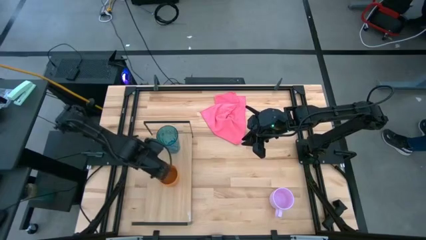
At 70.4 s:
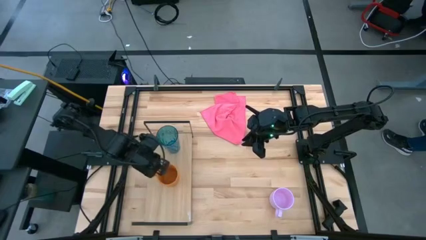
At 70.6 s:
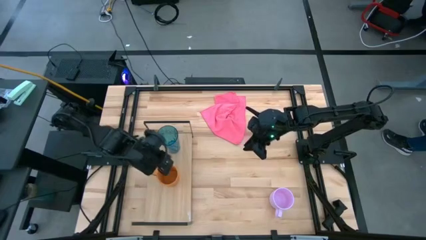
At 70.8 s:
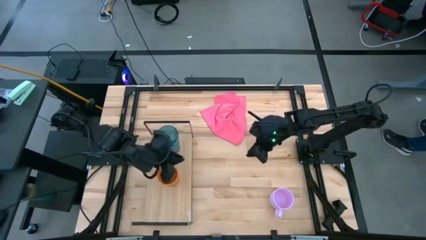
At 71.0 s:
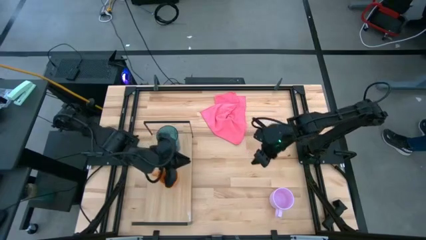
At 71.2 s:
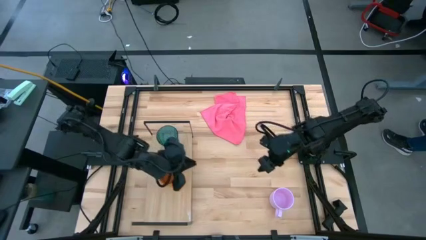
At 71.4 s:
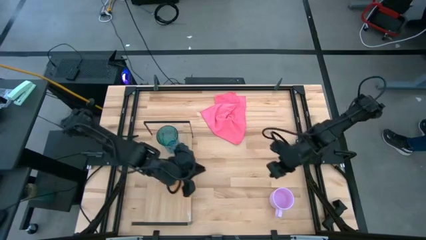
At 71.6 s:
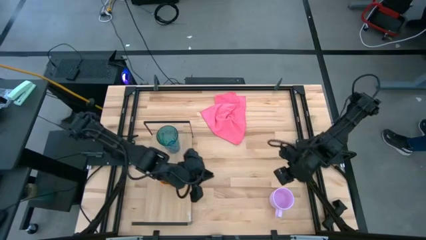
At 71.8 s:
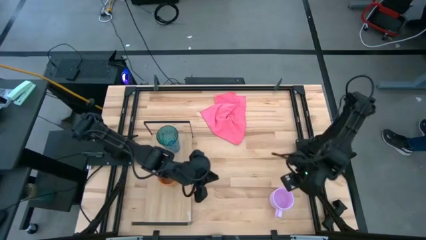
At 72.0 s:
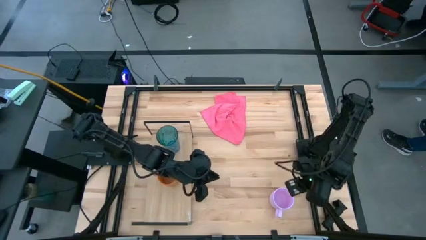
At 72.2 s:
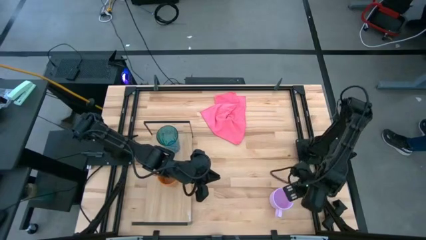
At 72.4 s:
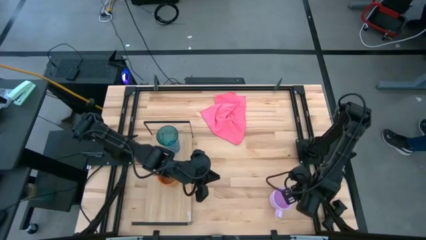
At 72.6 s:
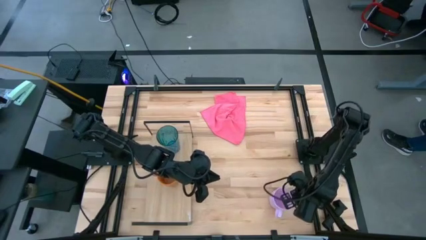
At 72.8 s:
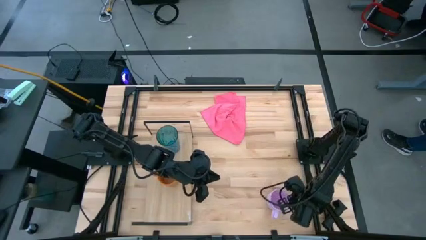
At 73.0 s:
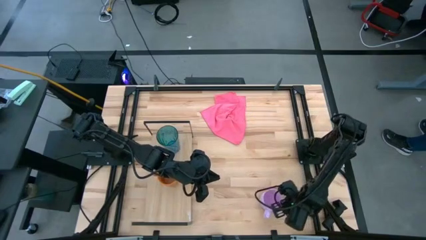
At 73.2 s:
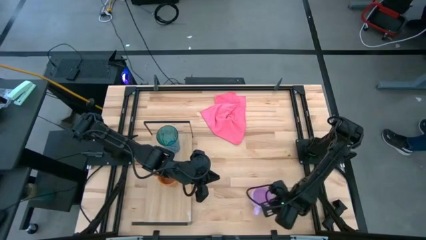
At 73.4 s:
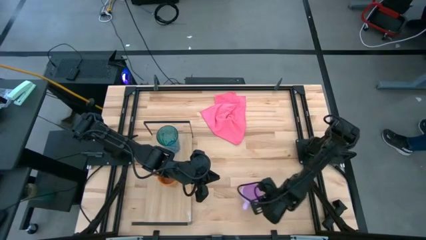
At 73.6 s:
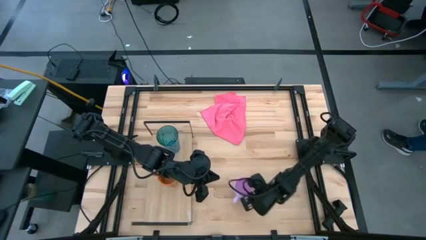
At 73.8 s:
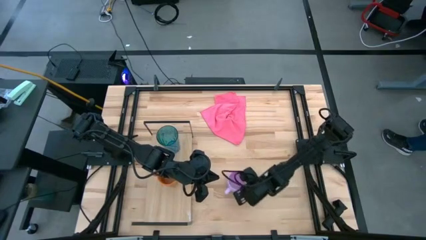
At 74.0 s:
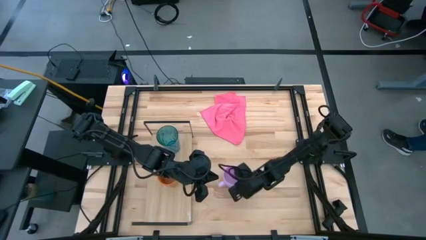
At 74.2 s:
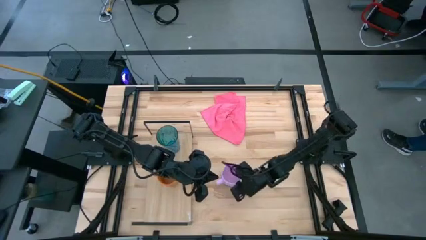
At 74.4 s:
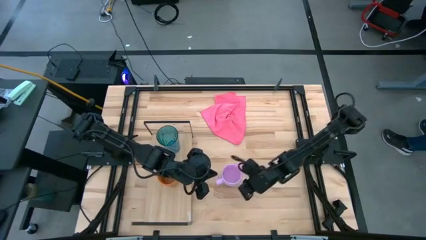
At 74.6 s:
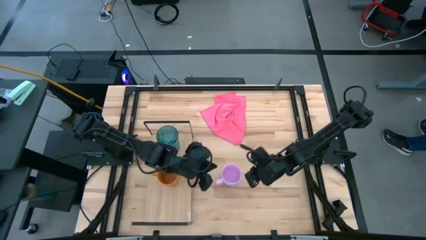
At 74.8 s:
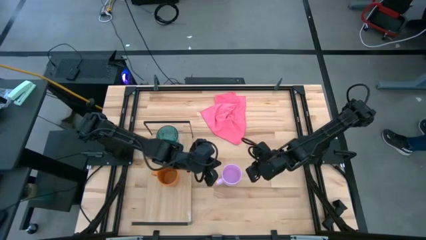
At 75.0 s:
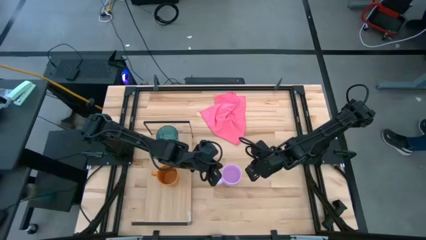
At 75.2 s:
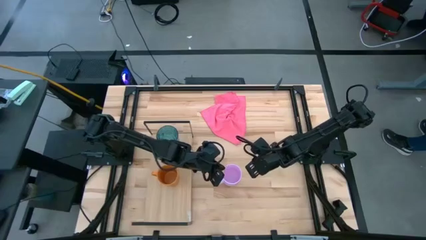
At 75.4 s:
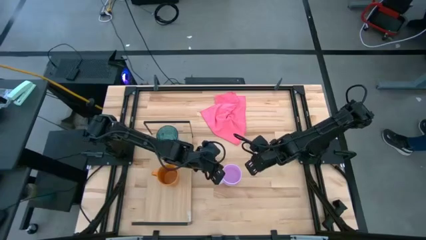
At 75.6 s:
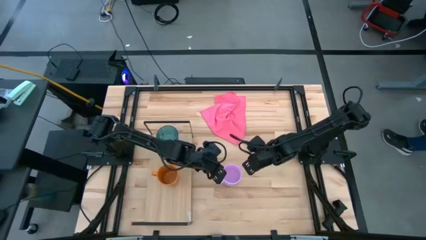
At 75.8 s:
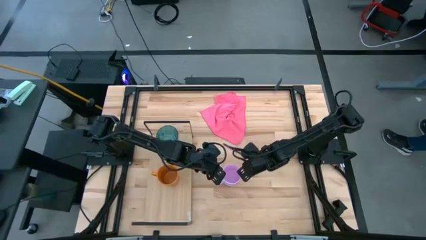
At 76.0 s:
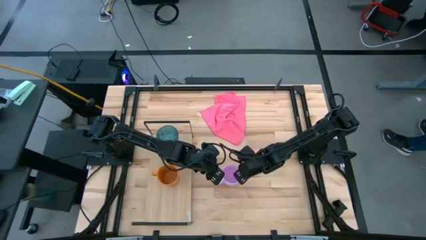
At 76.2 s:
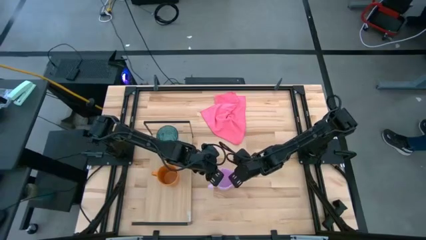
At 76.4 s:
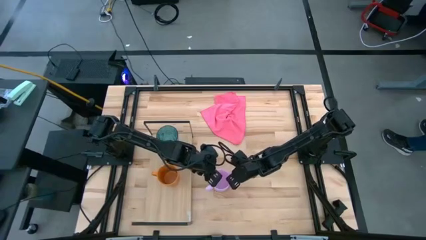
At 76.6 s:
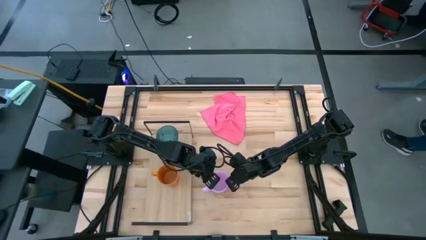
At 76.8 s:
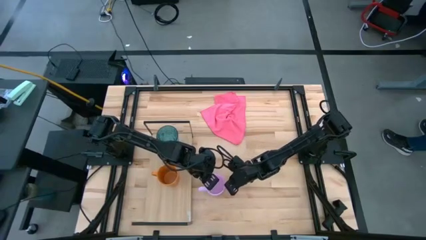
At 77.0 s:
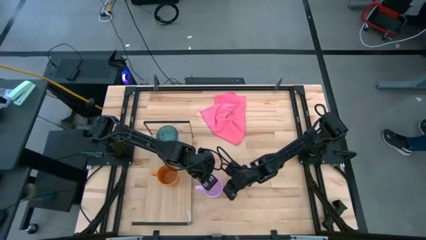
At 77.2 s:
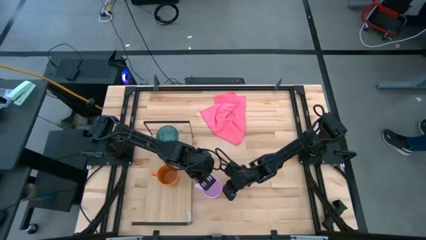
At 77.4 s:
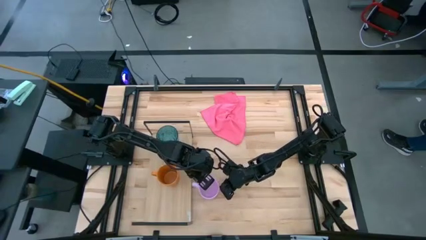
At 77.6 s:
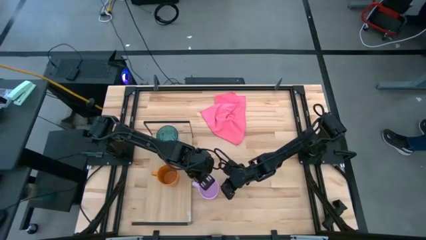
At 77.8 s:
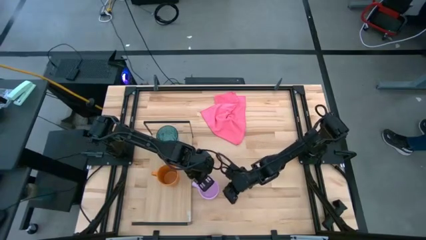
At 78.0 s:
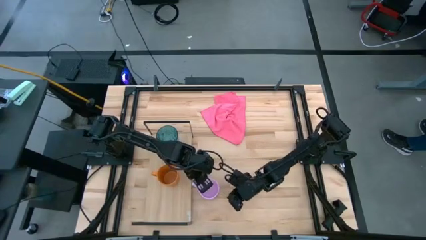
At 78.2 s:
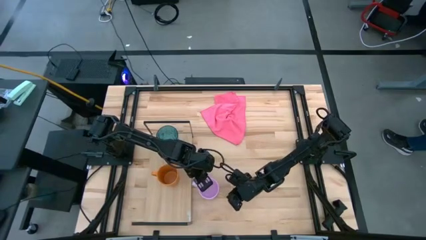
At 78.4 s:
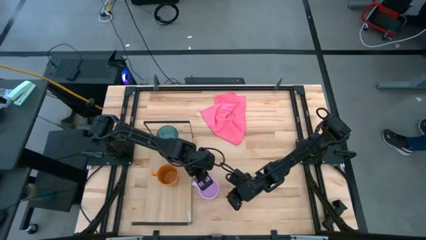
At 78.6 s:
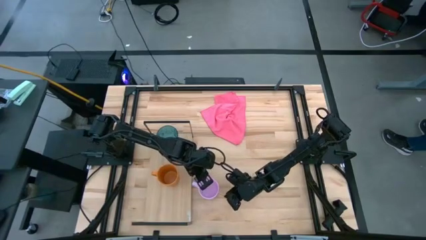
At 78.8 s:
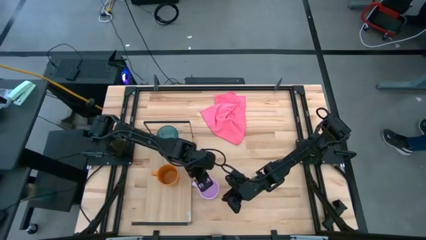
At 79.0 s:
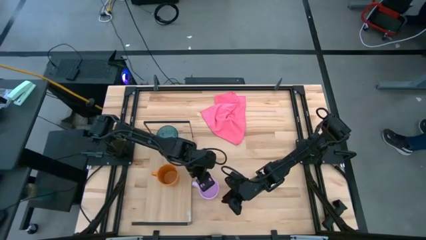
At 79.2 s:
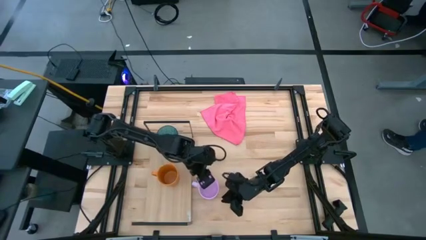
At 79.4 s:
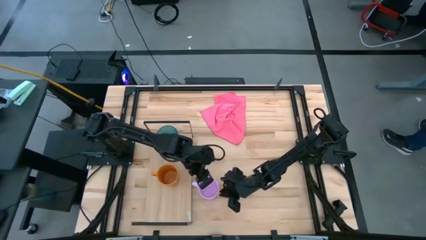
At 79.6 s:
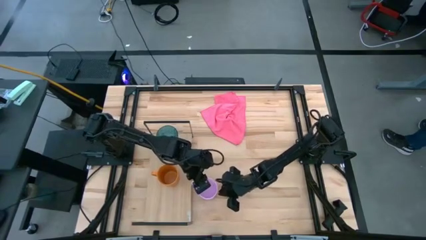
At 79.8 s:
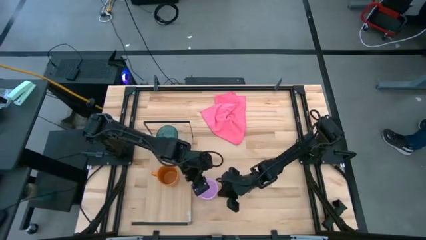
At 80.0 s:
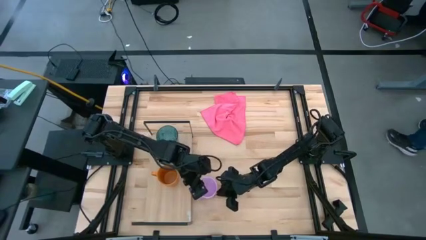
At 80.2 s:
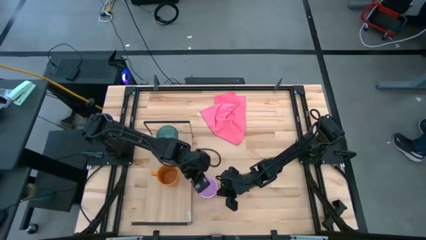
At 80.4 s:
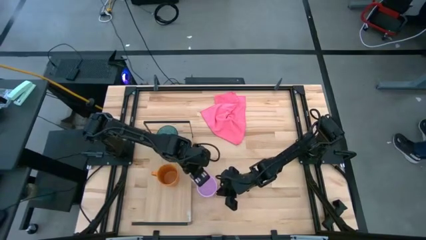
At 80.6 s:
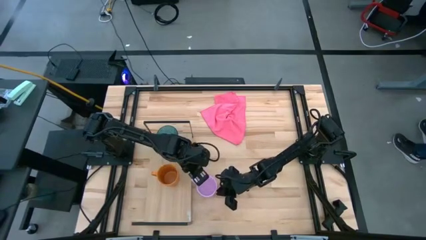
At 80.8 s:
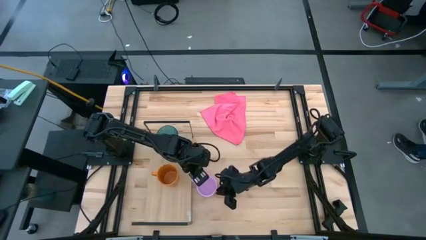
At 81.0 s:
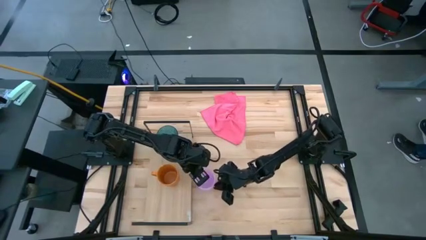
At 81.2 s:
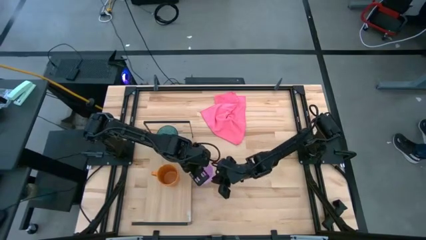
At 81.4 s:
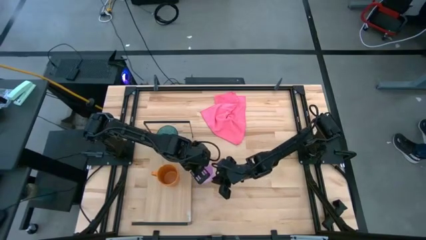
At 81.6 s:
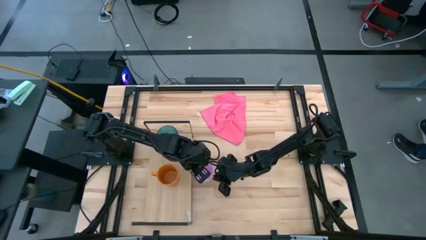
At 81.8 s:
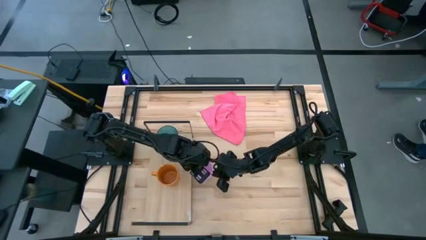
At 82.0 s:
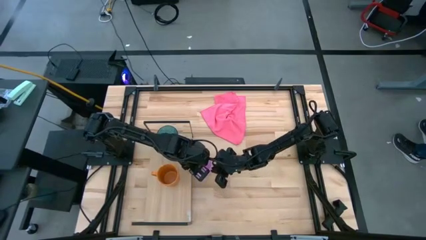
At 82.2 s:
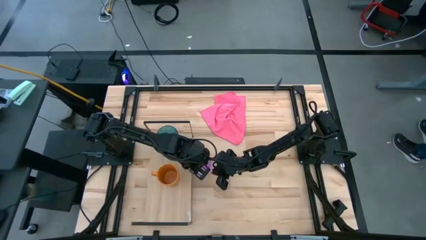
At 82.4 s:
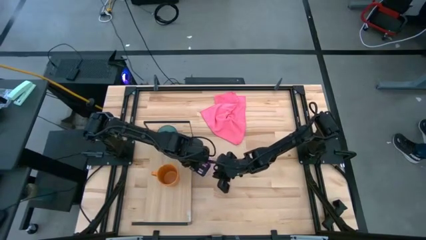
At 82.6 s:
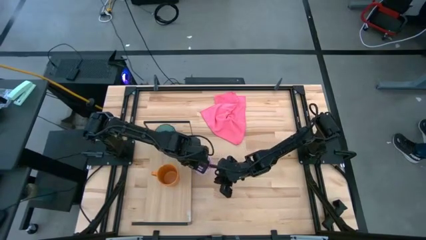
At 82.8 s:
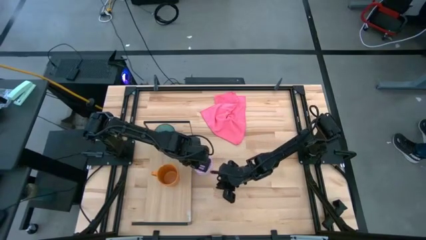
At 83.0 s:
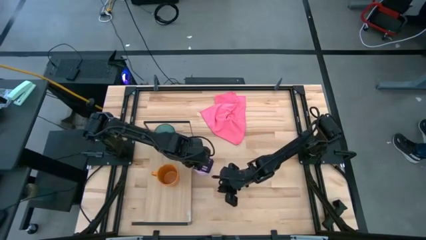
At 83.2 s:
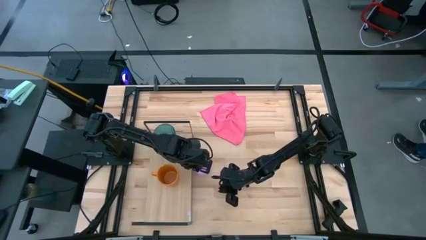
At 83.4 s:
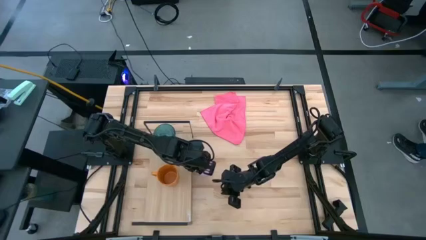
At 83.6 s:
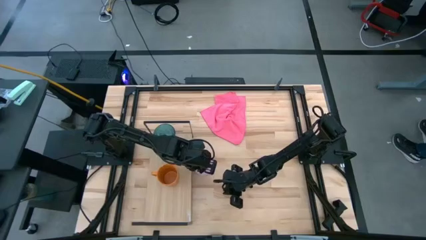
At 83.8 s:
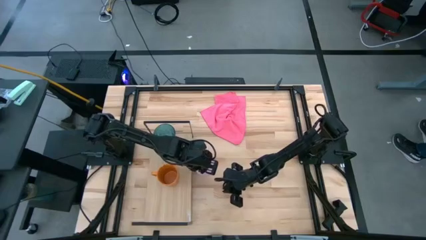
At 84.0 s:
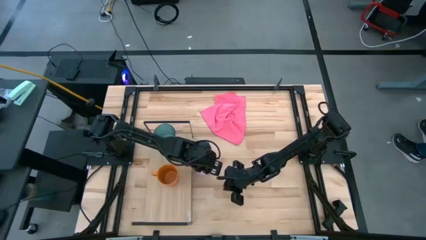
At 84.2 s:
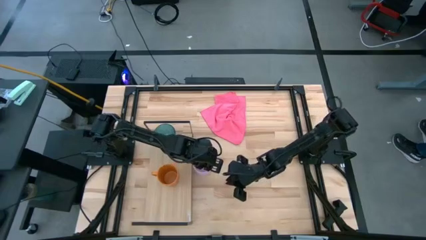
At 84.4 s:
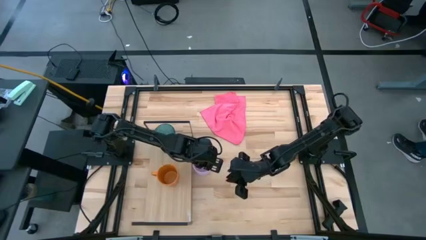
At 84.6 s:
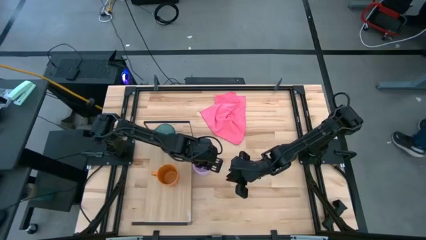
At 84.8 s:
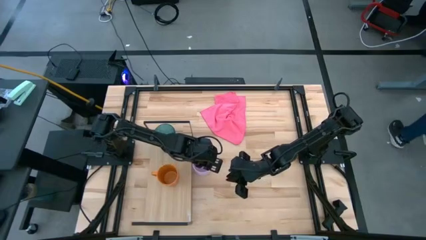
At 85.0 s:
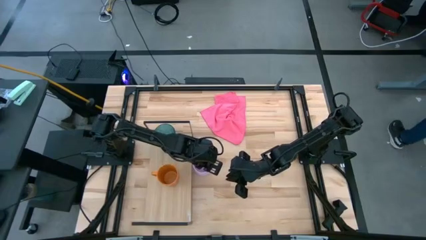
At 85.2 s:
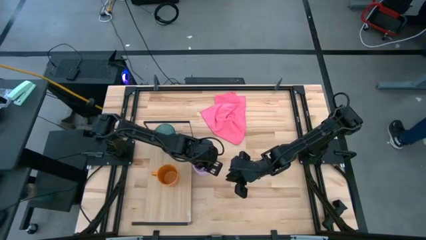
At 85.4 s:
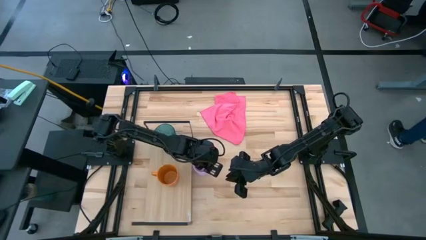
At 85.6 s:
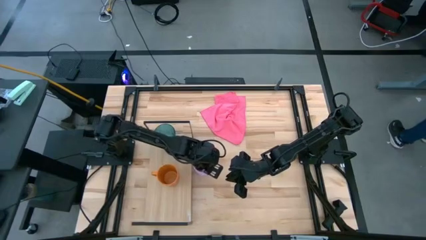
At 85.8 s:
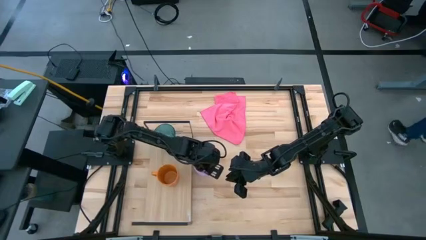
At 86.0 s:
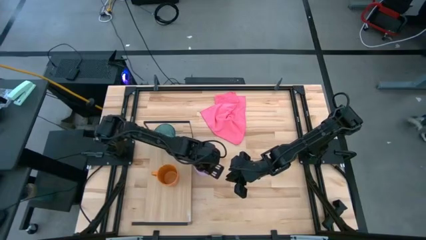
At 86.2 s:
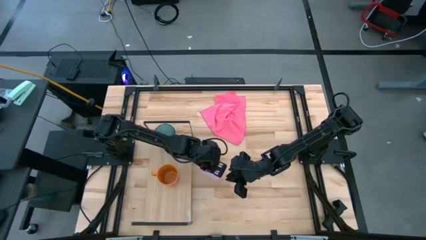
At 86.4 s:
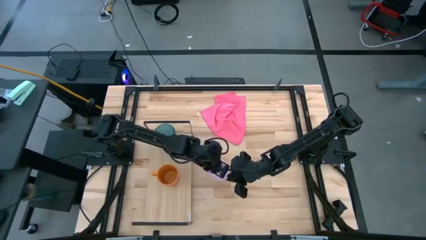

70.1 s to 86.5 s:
Task: Stack small to large cups/mugs on shelf
Put the purple cup on the shelf
